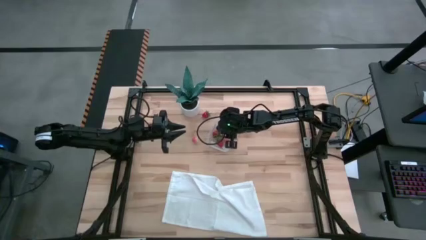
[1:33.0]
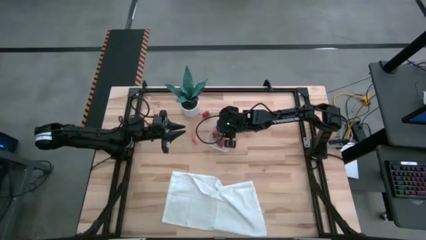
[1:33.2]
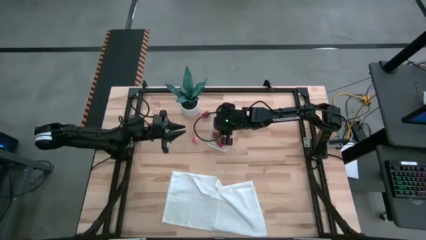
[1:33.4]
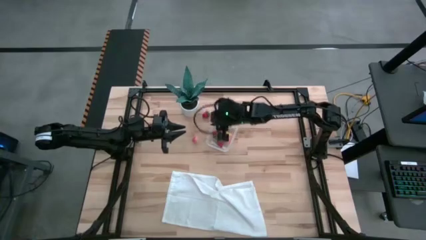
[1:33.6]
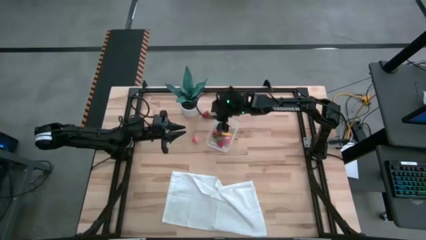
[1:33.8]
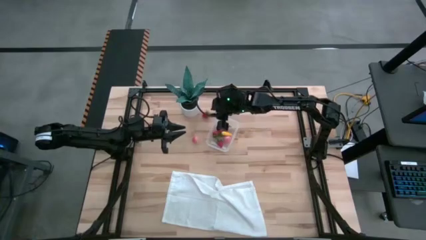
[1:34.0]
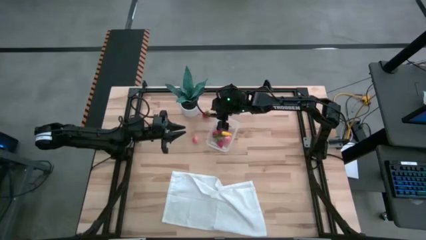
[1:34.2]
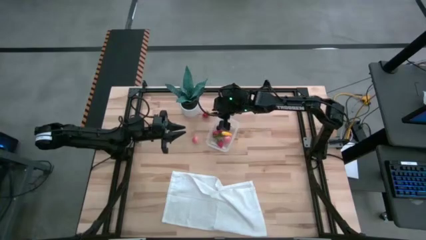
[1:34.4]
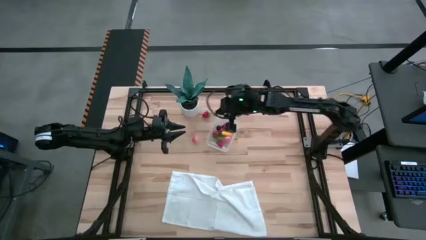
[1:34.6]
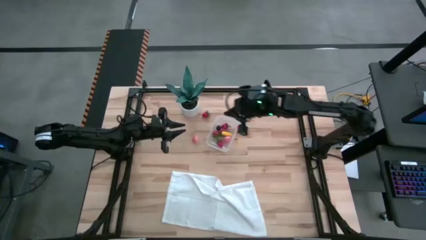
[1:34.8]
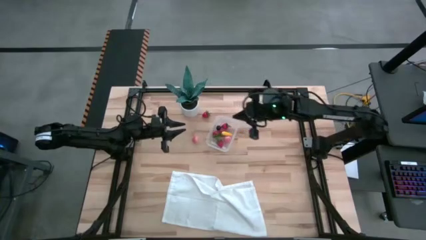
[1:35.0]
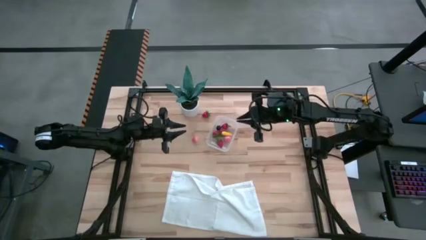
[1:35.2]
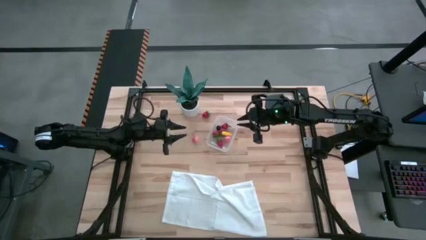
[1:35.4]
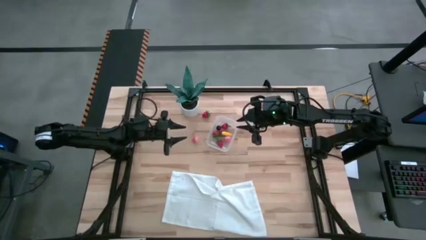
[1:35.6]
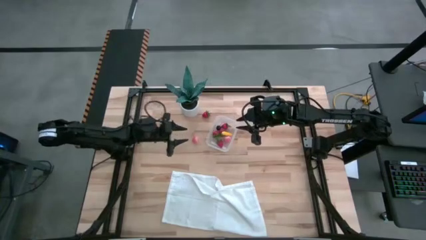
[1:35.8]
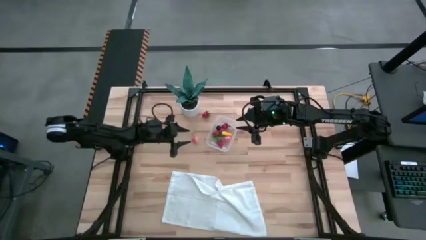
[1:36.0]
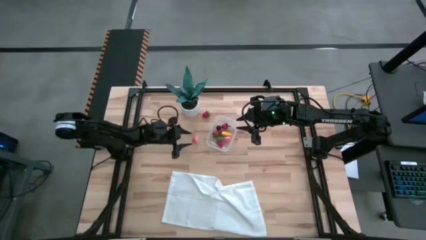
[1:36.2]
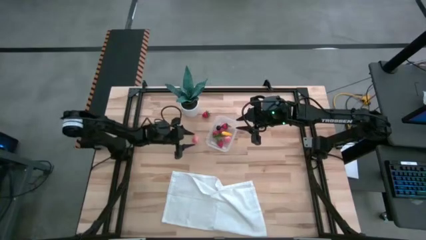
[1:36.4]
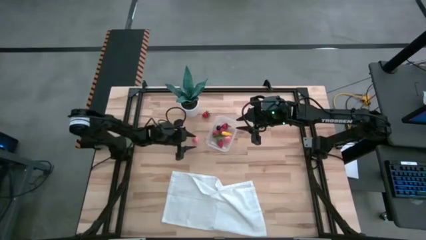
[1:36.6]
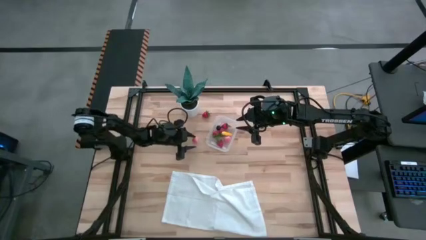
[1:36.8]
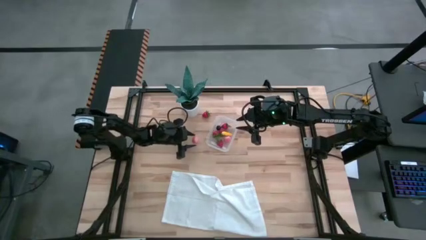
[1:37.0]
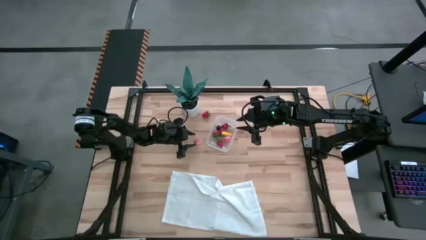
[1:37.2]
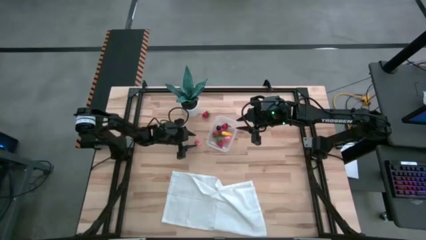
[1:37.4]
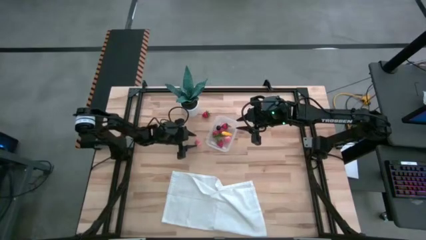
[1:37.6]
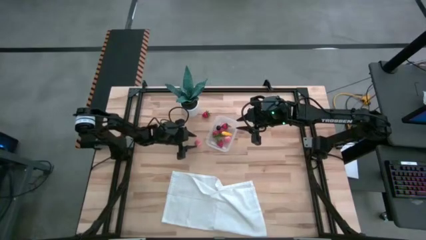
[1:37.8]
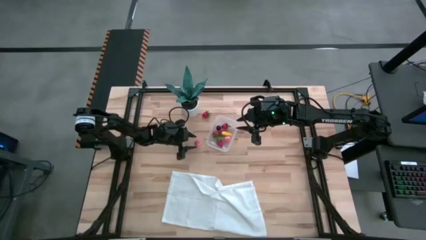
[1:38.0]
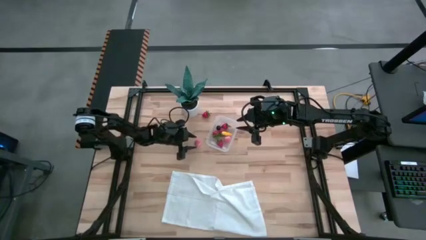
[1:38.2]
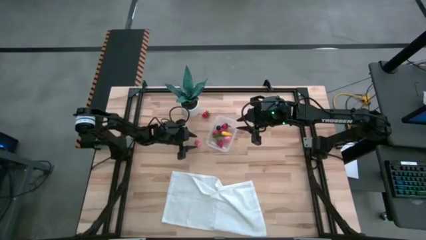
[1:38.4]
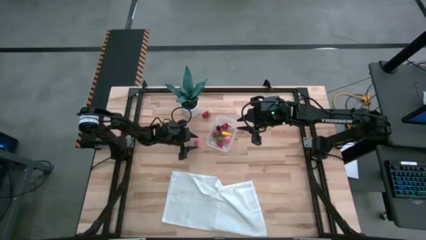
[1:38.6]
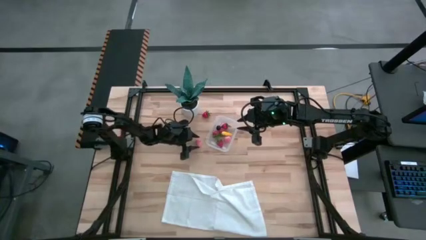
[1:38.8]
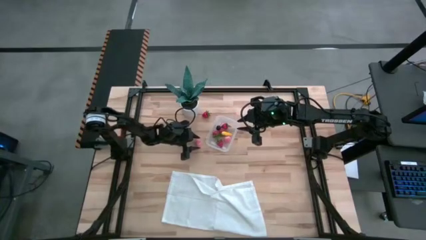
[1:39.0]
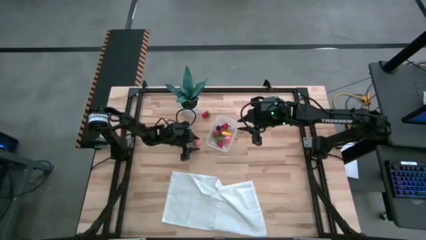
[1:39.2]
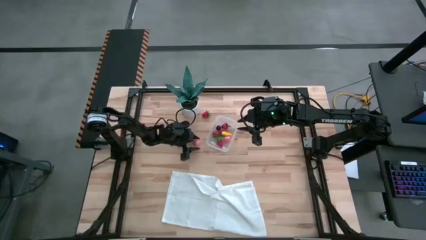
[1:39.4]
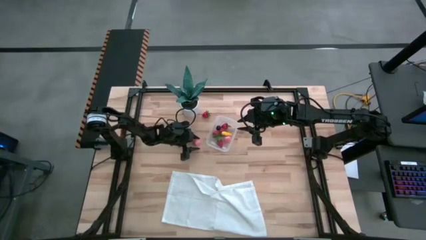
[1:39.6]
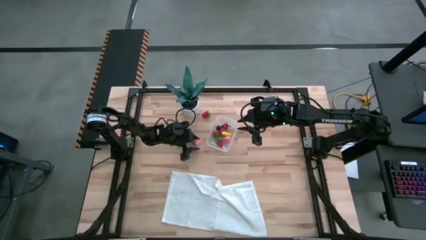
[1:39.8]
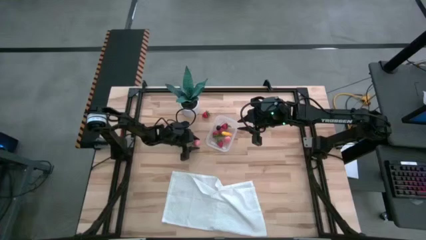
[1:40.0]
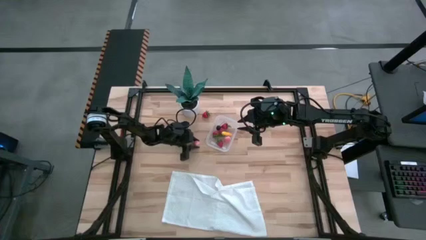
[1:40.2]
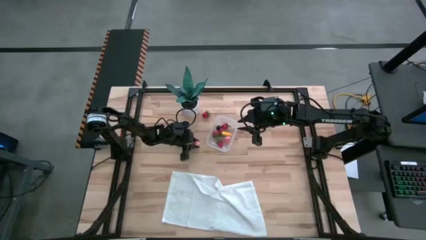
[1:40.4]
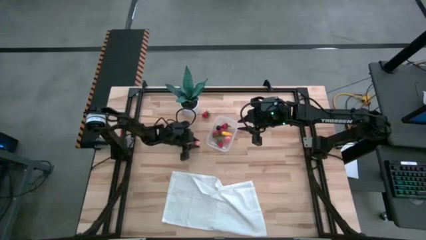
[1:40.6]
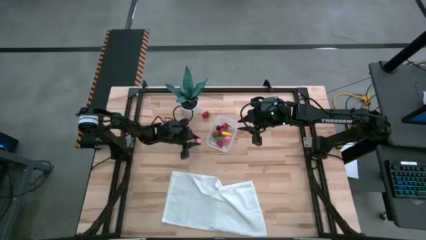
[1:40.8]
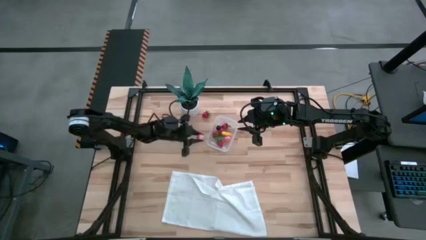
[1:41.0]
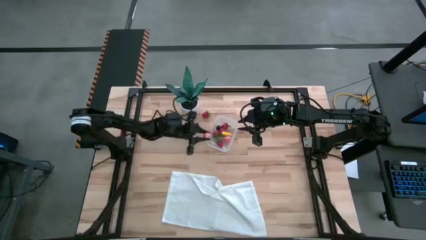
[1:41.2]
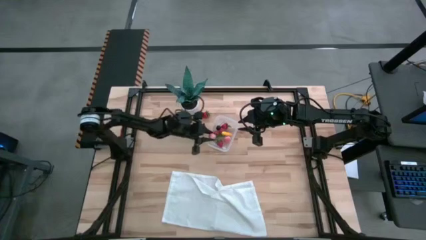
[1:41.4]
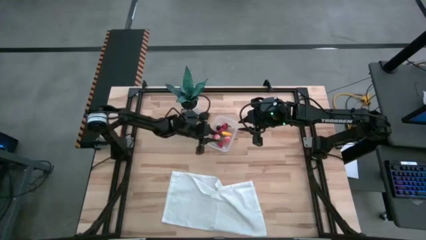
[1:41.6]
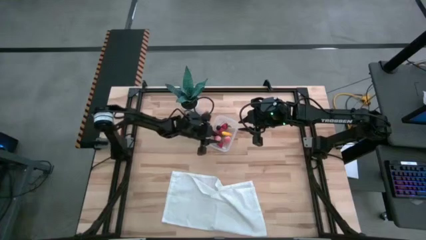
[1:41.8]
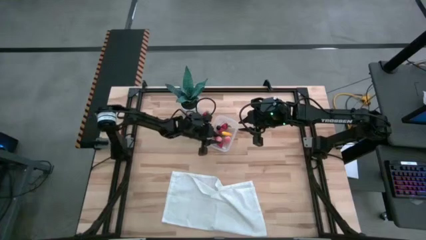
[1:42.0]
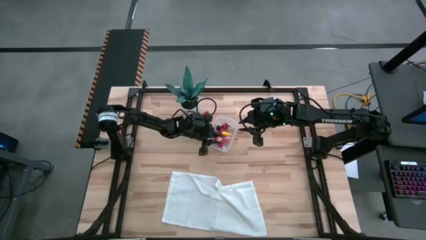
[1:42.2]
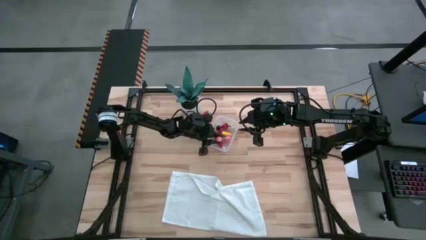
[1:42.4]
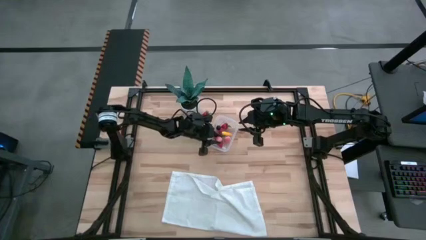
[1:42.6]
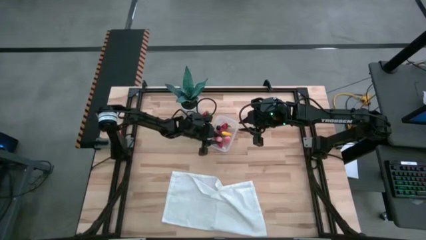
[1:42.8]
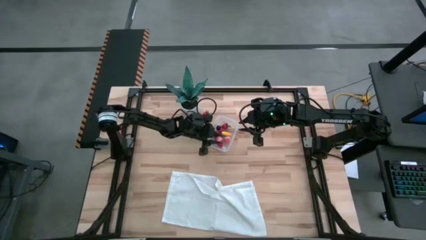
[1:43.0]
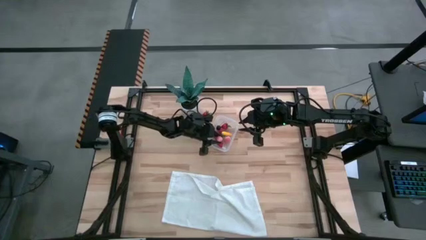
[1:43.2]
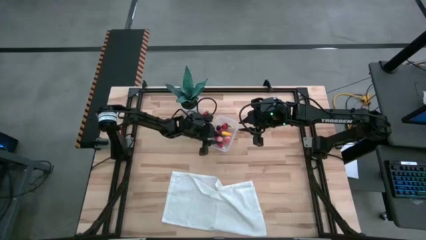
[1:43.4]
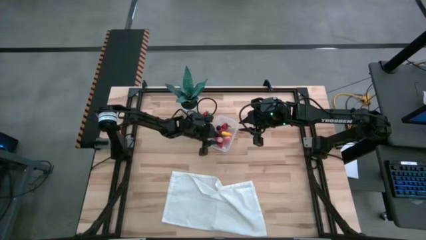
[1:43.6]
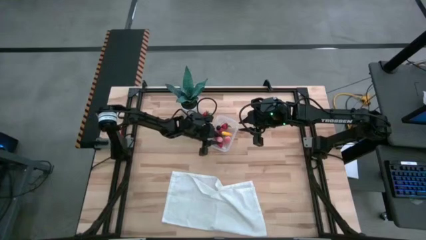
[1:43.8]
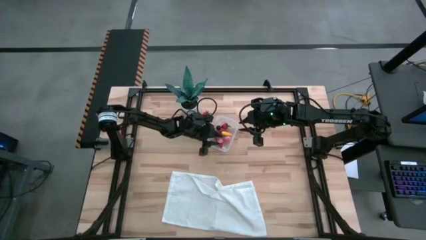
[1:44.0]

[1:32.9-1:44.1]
Task: Pick and placing Produce into tupperware
Put the pink peach into the transparent bin

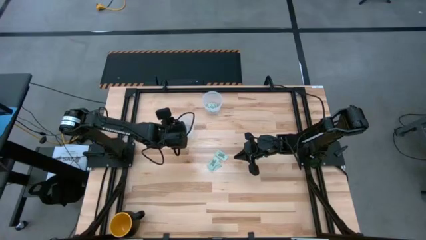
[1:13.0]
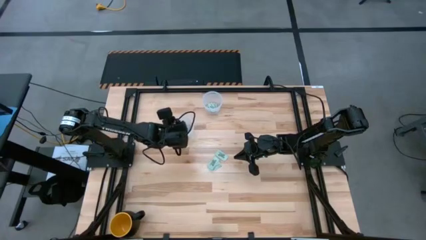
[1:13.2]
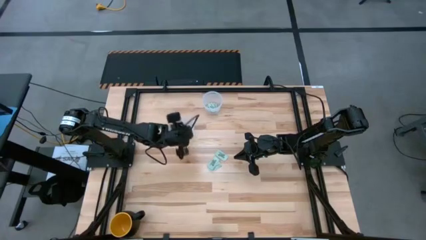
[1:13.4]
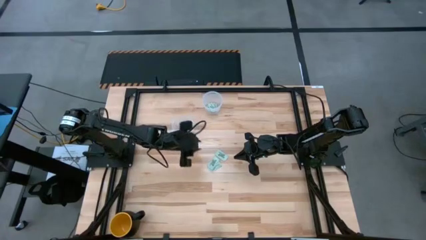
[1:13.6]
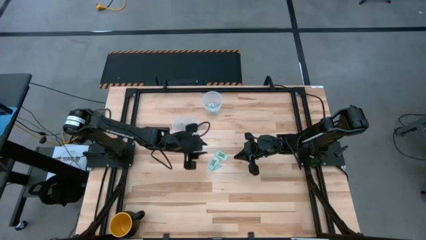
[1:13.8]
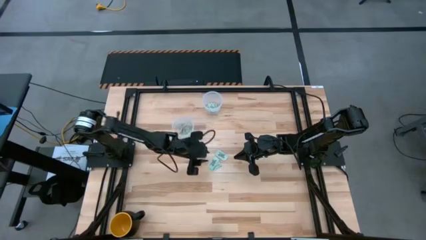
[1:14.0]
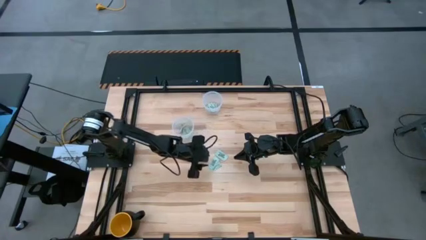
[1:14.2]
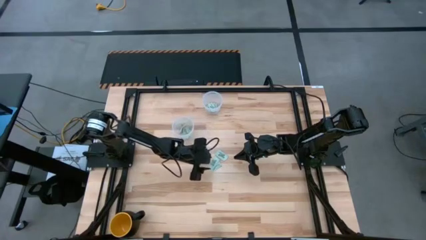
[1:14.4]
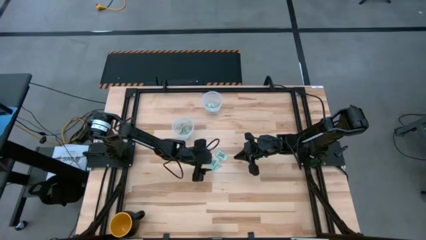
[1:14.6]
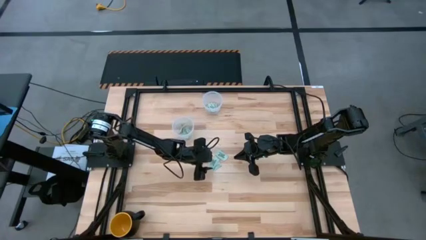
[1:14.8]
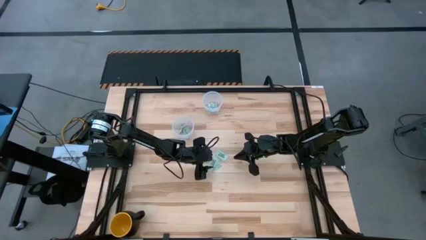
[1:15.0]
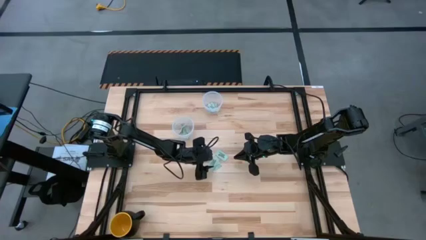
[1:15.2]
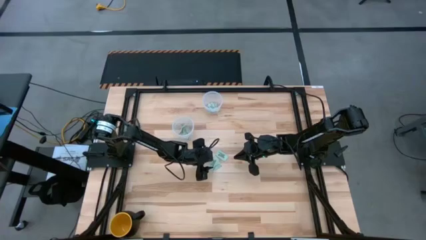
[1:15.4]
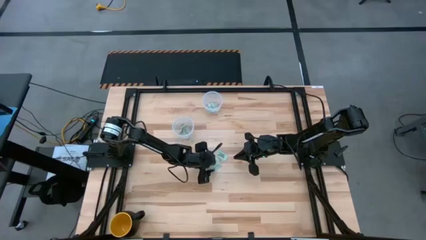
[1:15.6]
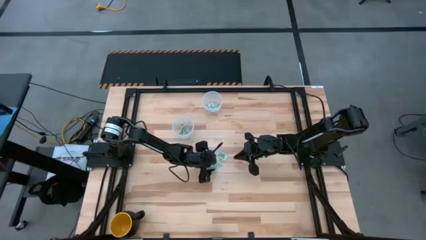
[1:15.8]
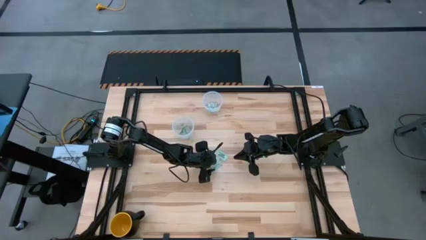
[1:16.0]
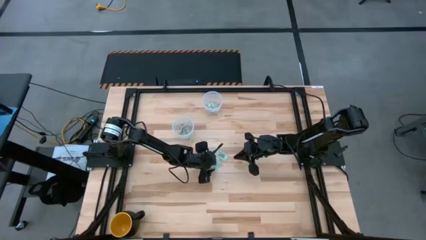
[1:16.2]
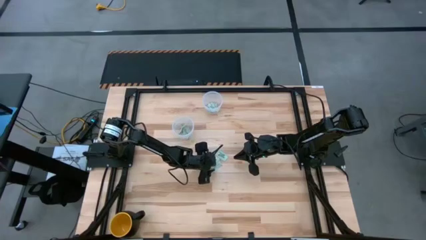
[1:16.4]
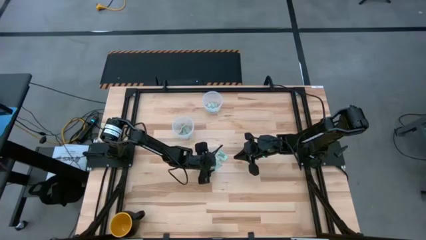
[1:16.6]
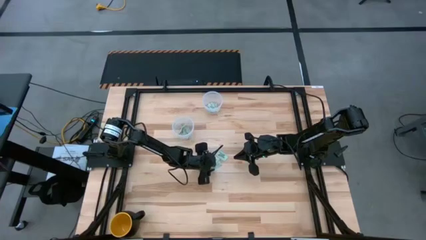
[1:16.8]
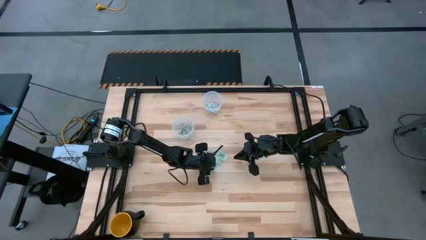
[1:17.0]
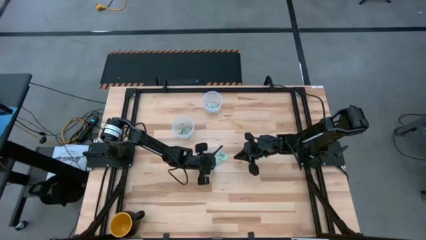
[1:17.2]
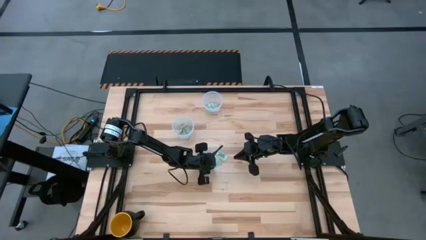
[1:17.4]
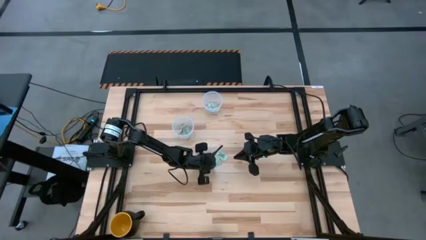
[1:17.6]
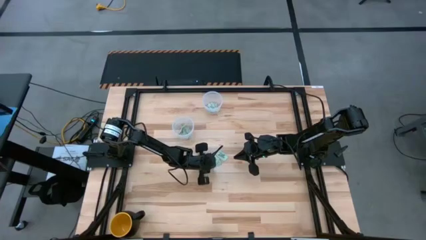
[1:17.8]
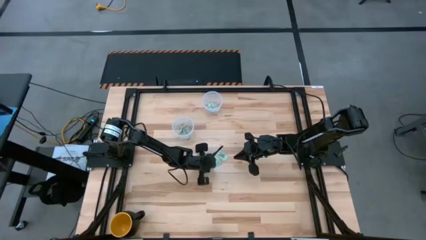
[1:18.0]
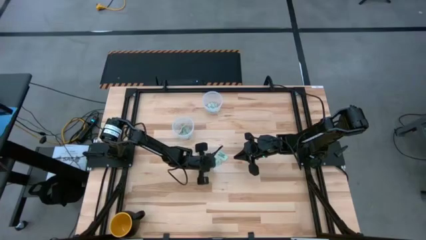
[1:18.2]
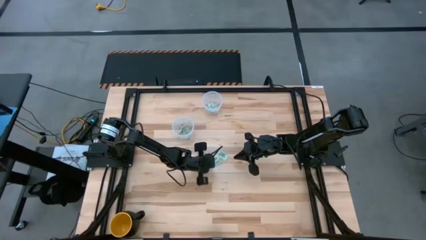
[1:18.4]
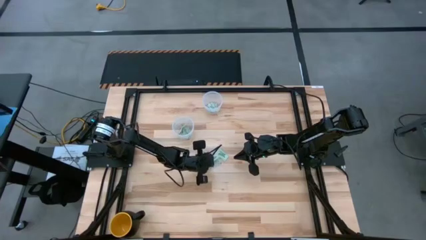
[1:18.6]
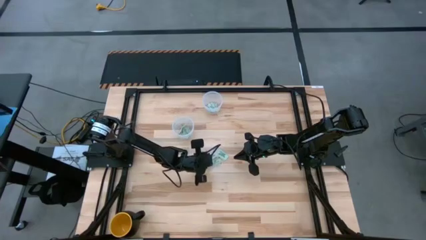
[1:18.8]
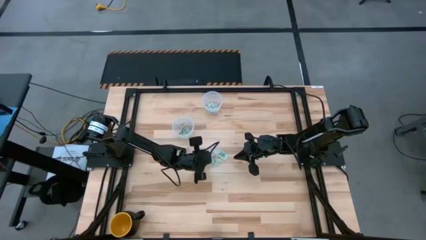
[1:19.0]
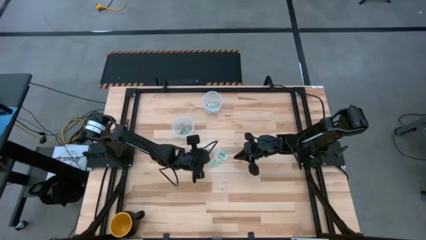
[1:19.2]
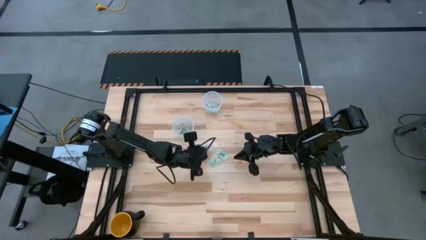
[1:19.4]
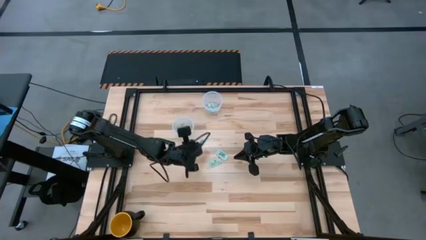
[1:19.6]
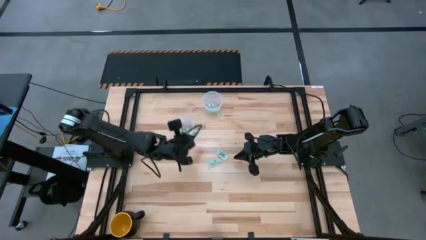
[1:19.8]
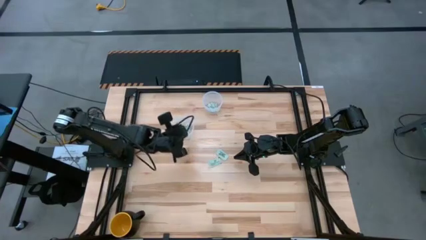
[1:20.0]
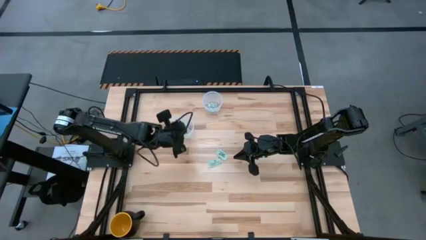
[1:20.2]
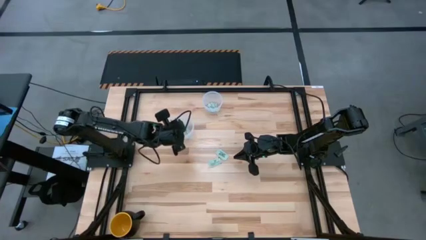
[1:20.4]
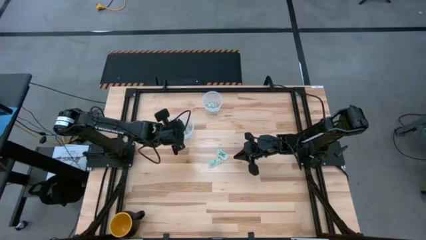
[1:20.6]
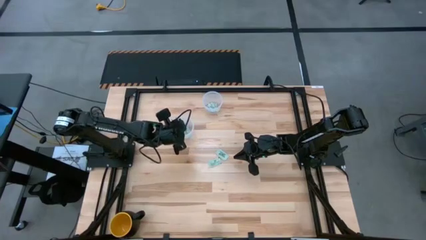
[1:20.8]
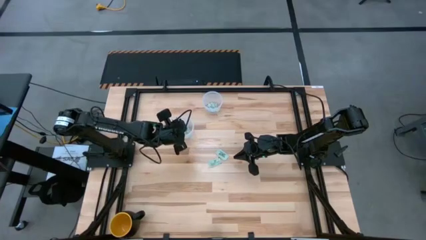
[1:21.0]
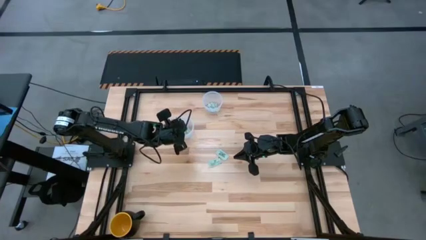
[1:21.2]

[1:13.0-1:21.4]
Task: Pick and place items into bin
Put the stevia packet into the bottom transparent bin
